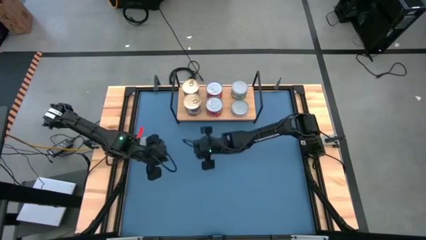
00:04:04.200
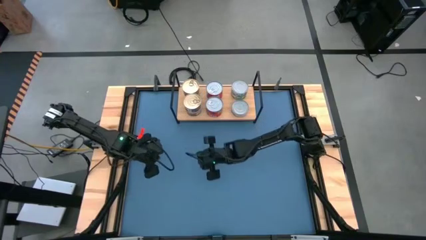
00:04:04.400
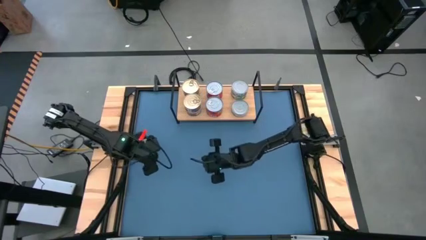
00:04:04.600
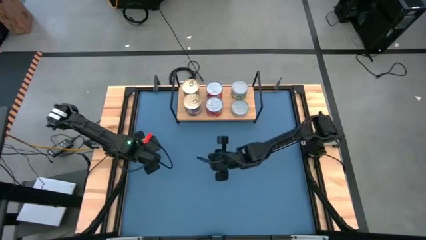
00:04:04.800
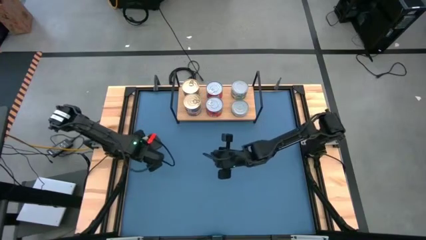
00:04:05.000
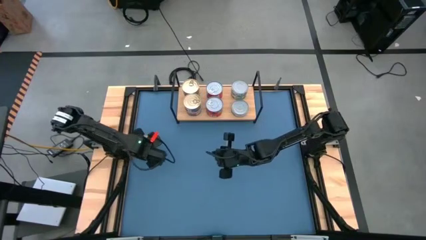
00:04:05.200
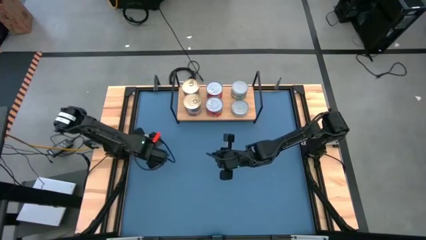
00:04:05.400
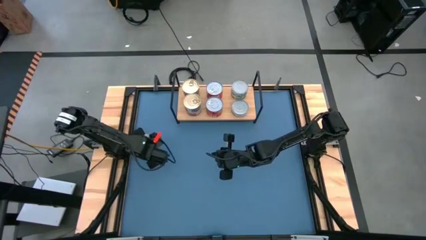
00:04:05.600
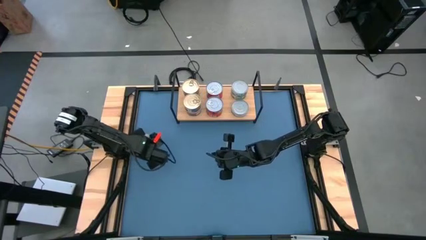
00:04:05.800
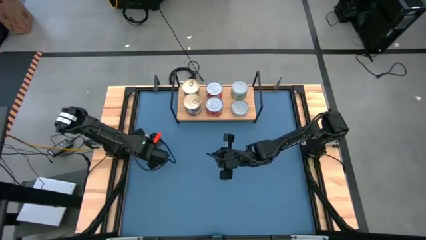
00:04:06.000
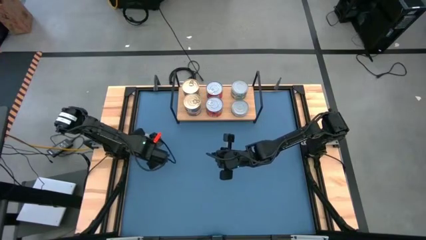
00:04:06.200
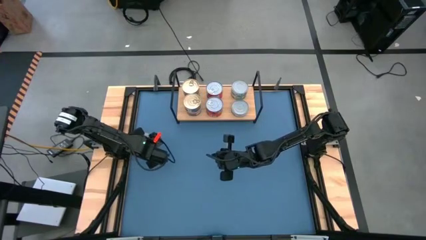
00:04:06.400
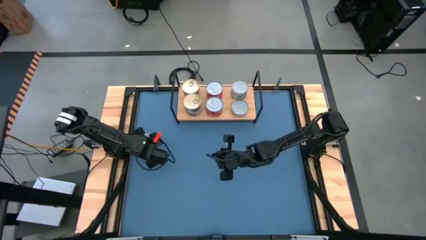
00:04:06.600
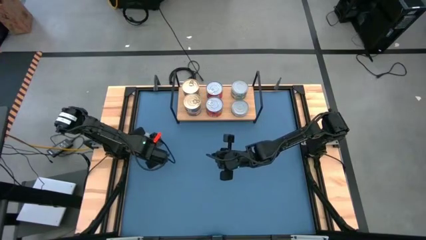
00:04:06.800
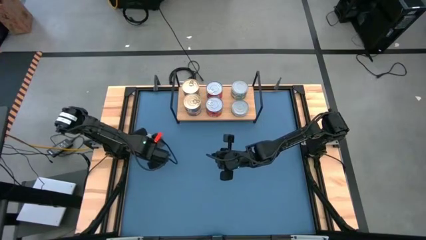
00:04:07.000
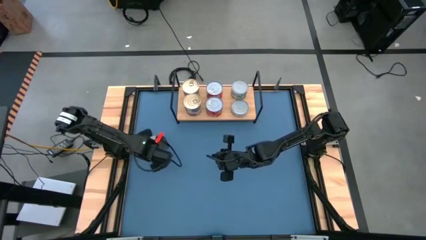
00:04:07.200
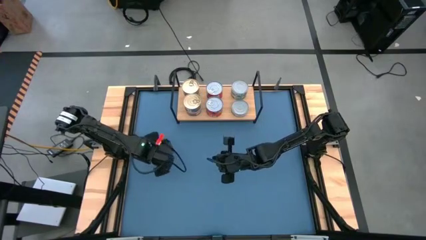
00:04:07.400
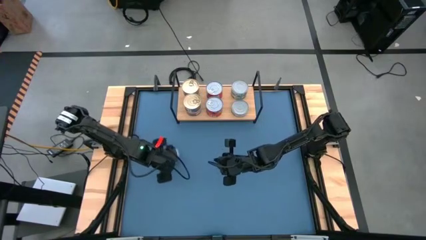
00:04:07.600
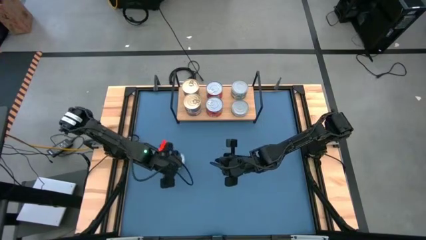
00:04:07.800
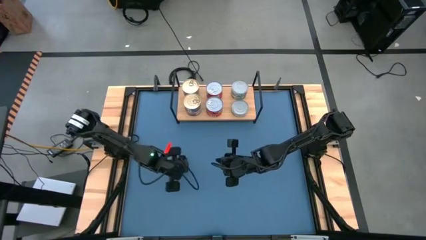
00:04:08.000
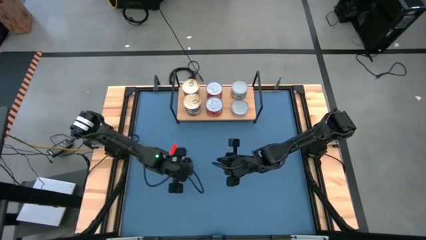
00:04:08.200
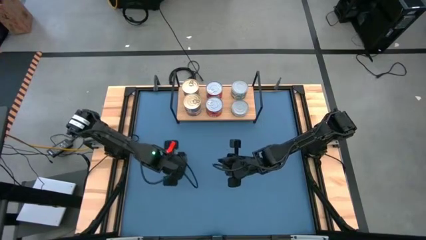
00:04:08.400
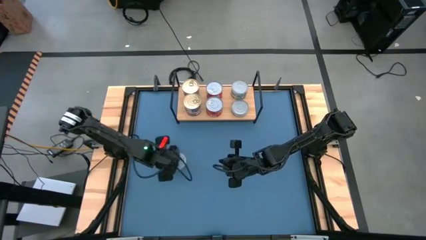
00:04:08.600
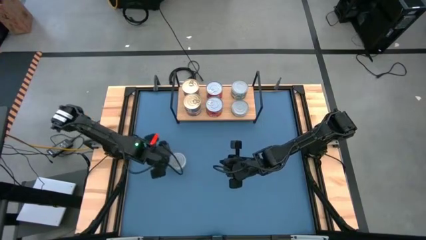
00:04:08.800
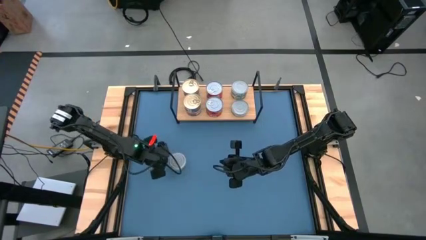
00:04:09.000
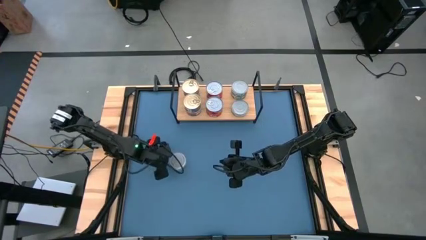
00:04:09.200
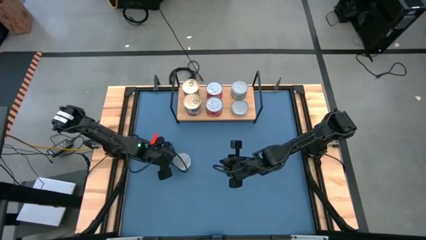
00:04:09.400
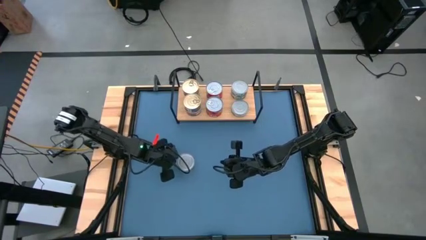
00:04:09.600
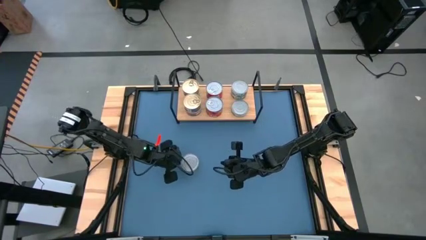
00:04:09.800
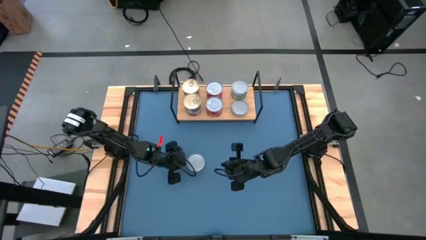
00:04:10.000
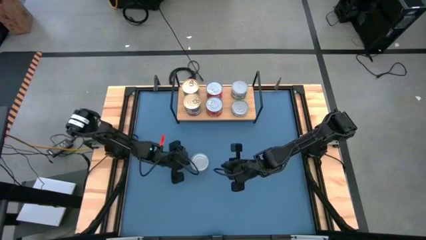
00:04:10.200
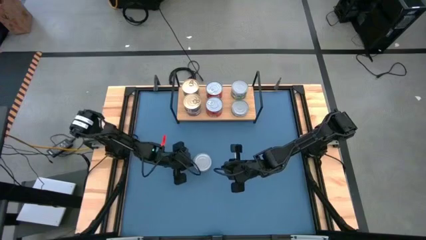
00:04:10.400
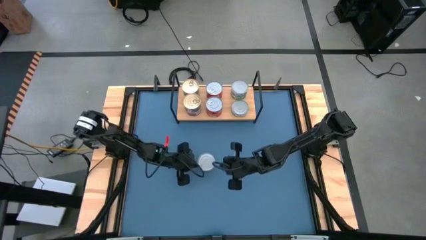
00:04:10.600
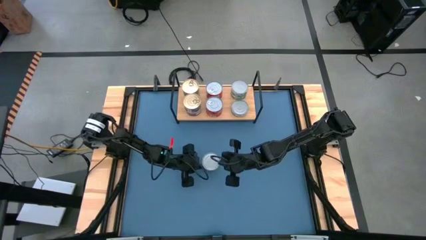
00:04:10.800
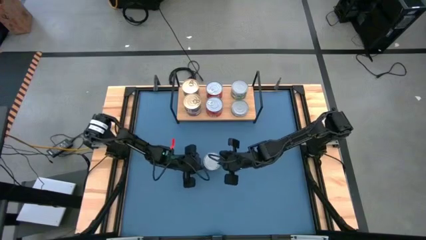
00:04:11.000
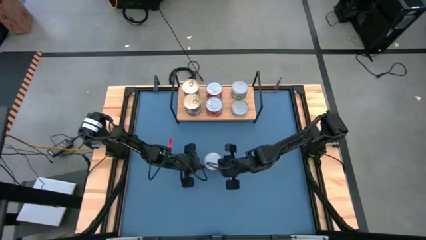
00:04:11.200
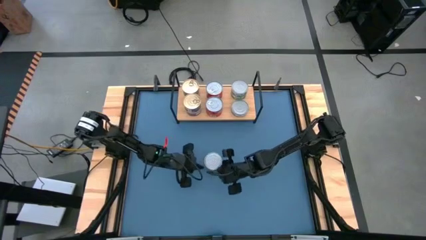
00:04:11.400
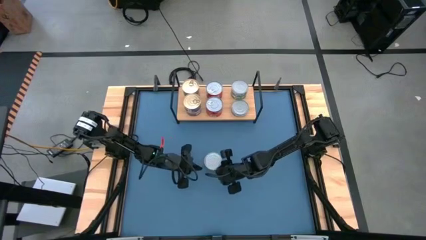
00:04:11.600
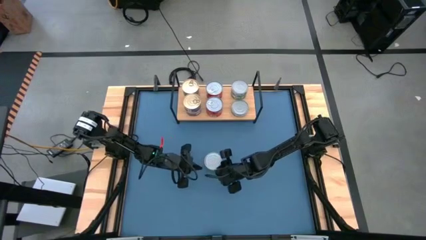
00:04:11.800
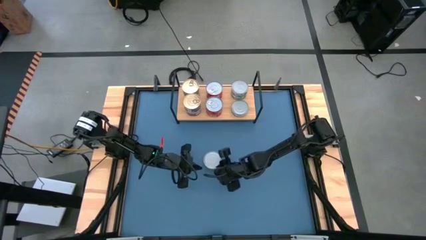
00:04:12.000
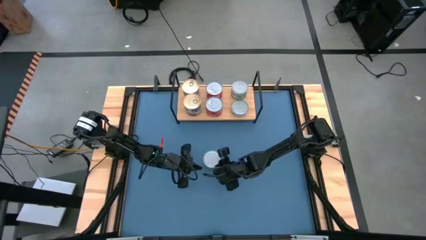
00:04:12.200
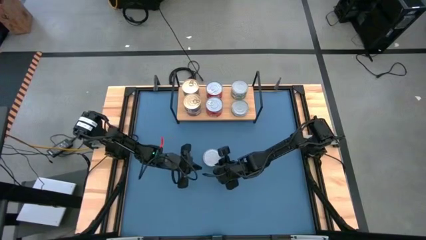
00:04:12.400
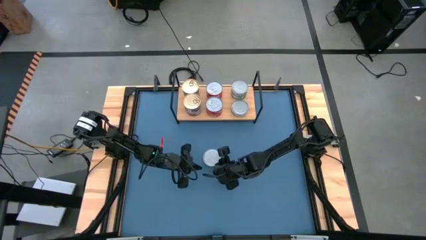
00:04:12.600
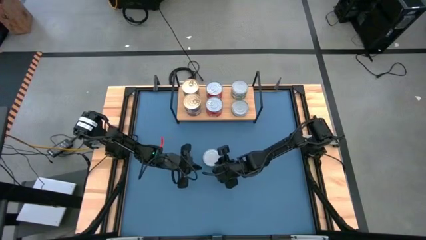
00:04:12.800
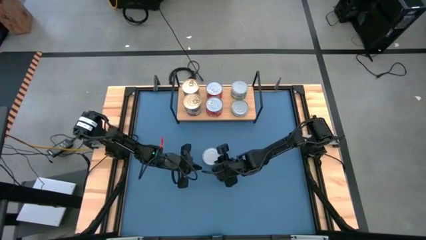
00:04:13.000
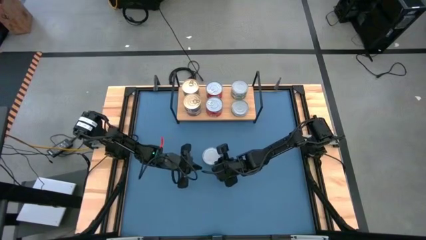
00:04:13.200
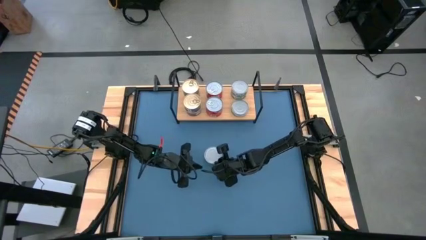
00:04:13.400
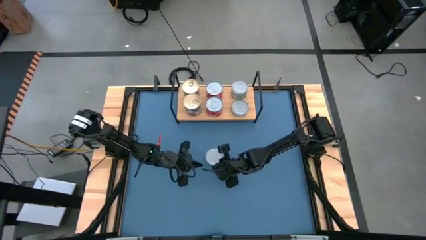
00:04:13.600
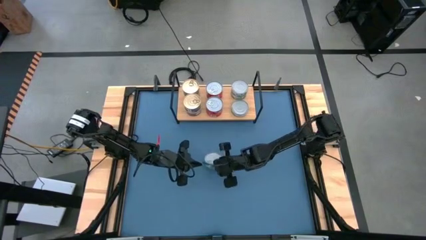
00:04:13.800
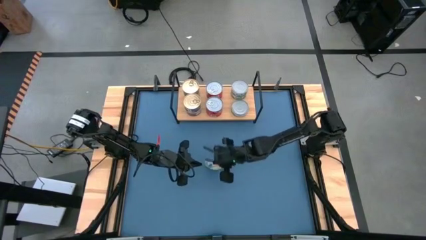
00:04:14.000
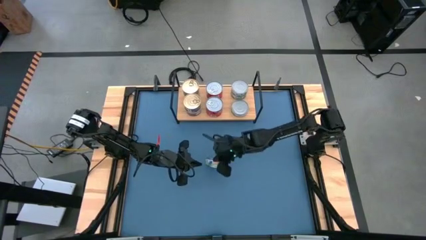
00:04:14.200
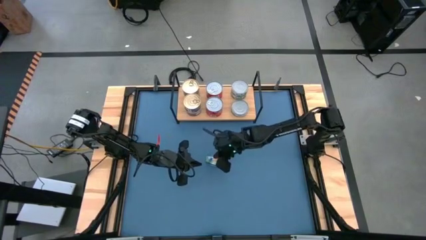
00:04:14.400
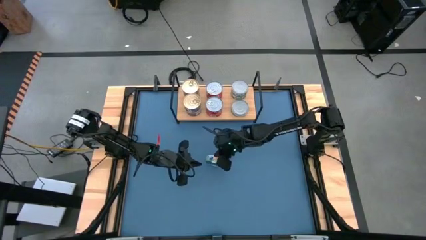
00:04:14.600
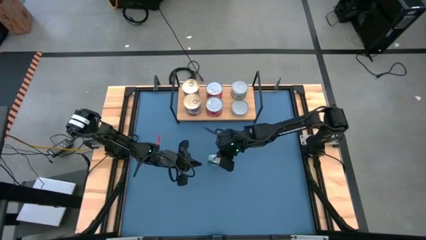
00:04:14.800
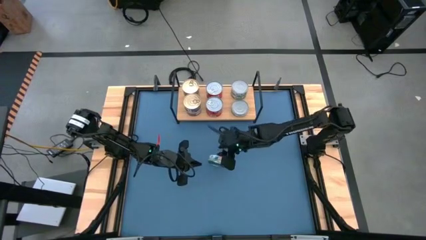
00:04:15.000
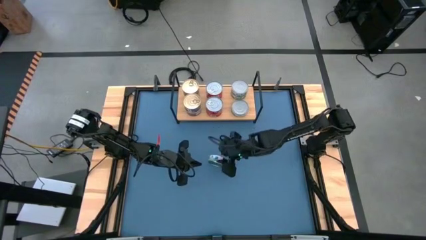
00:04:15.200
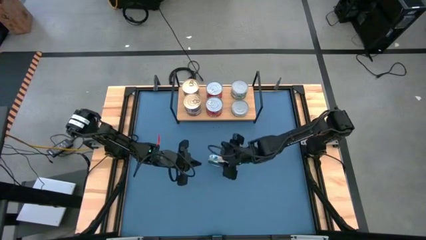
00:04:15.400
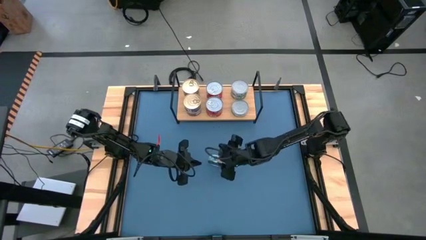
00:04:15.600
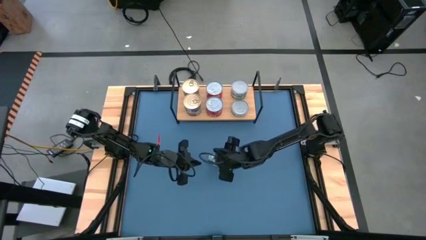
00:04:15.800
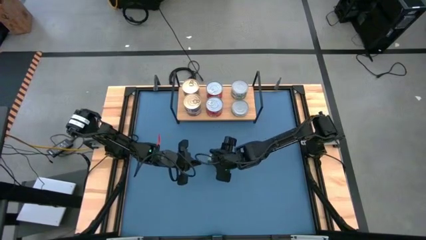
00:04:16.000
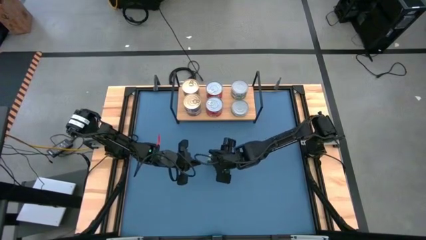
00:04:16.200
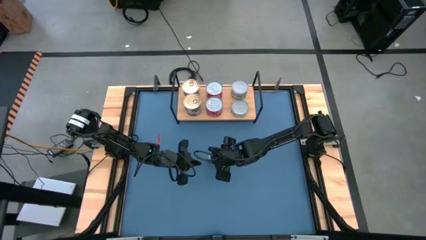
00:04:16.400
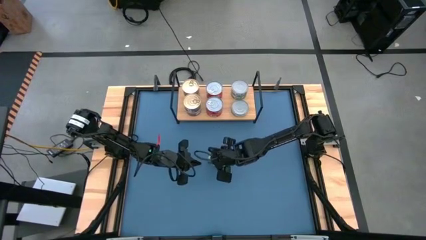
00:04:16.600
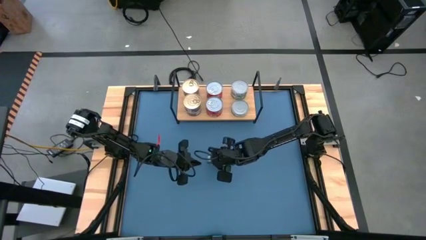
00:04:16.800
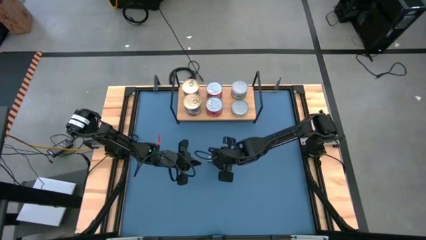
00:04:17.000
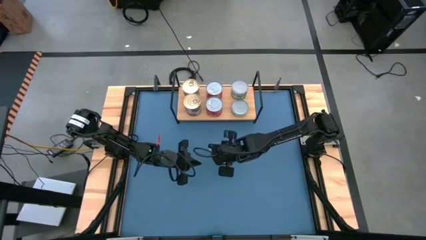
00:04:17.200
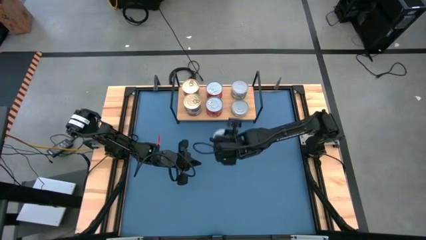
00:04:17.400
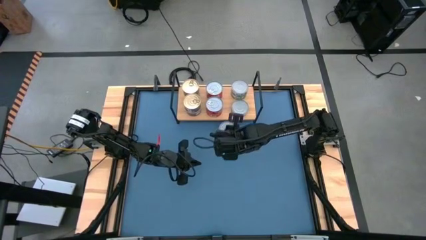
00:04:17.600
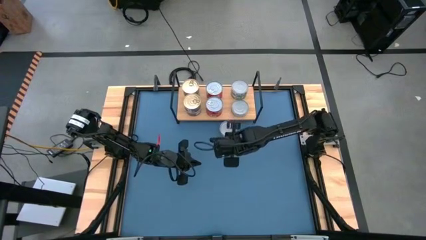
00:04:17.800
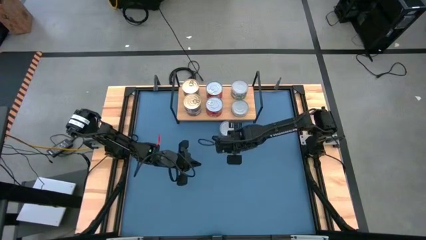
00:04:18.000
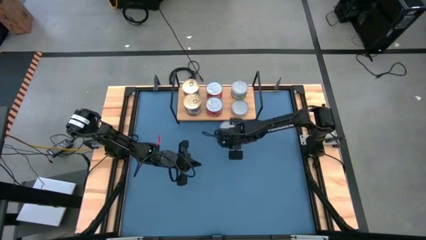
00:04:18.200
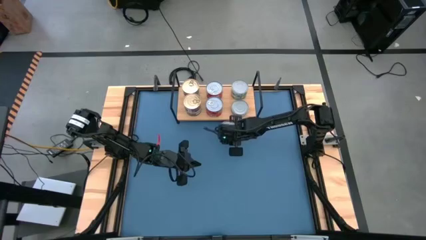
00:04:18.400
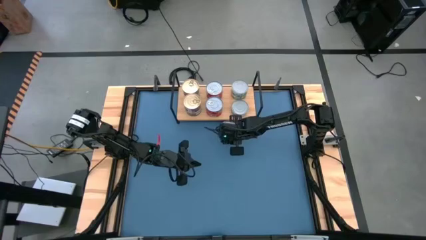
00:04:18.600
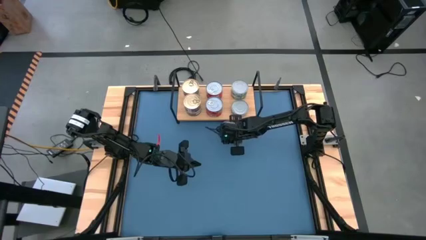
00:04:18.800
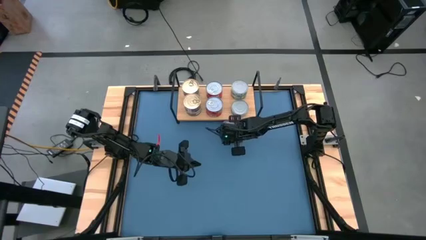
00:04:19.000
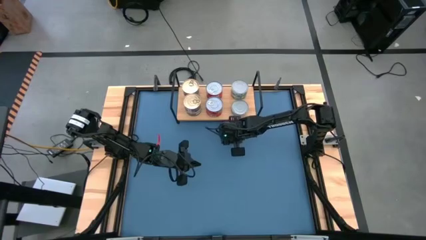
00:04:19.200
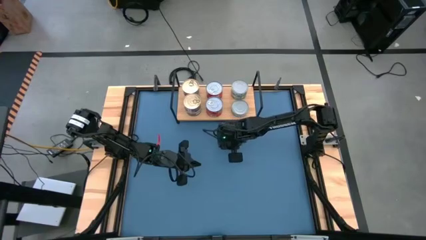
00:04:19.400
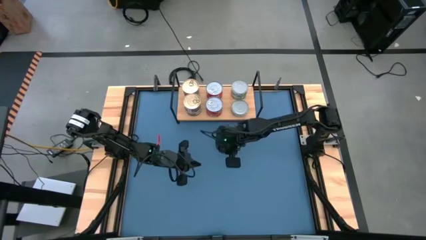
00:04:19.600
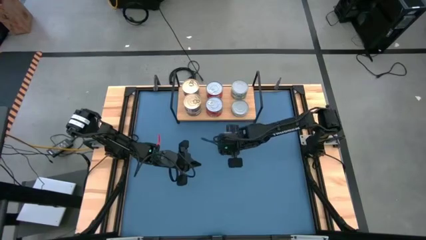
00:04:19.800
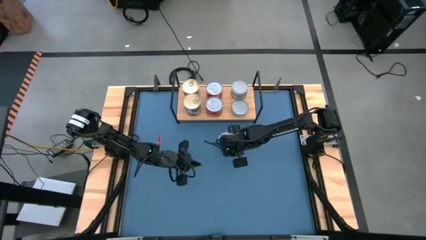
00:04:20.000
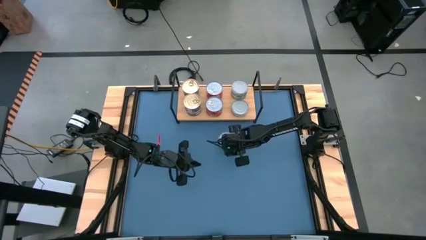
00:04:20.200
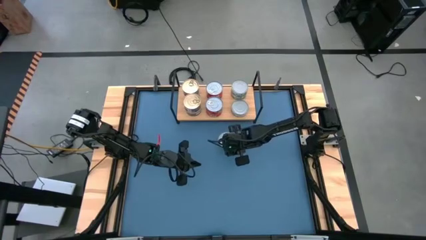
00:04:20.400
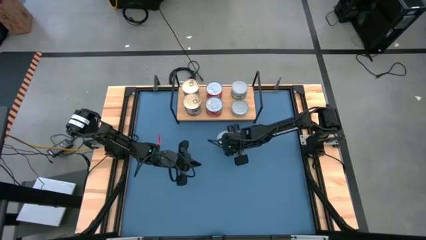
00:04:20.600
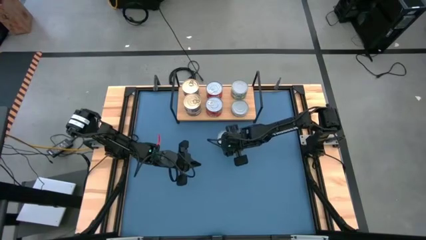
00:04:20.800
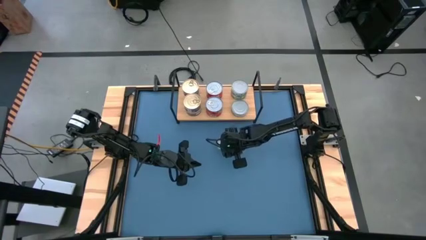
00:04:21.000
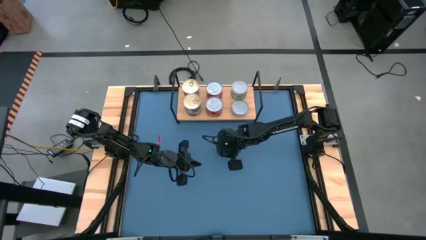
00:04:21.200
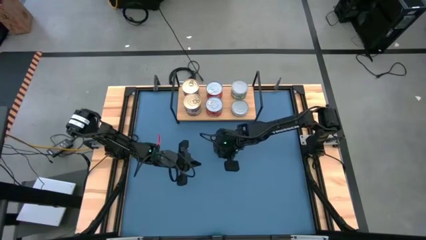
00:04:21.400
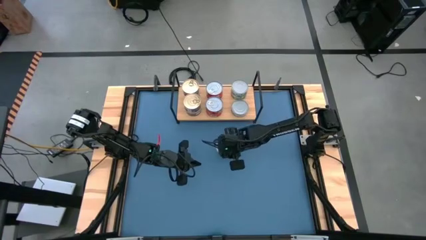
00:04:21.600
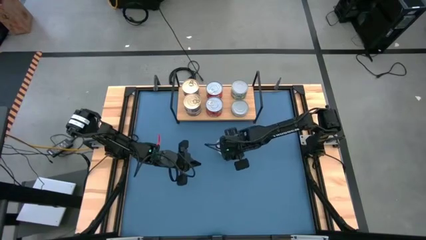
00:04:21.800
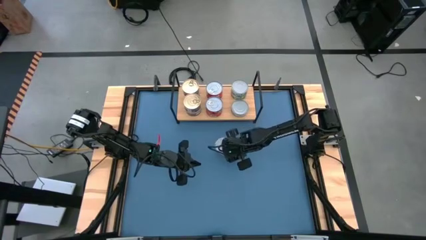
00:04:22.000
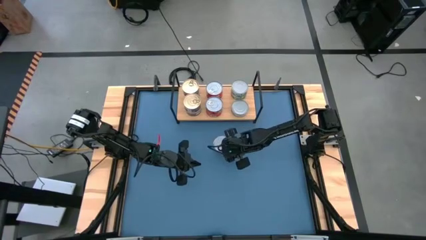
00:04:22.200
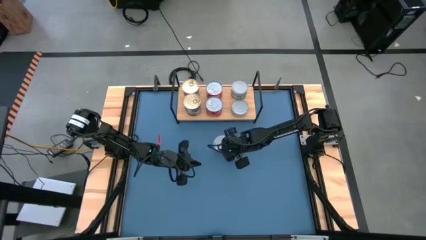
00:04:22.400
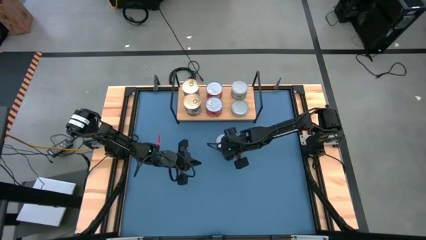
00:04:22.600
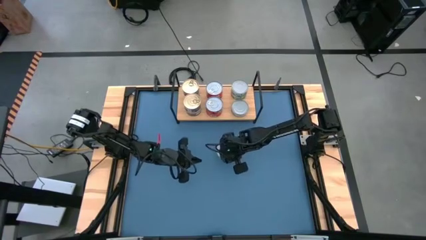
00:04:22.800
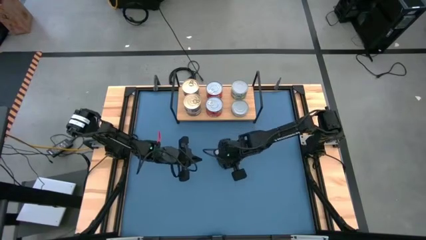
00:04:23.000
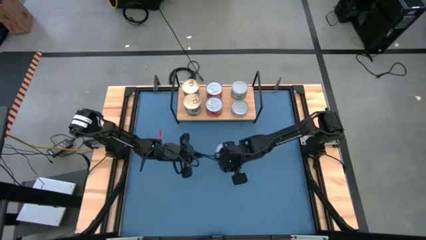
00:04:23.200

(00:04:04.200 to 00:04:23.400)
Task: Stack canned seafood by type on shelf
Stack the green tuna can on top of the other green tuna can on the shelf
